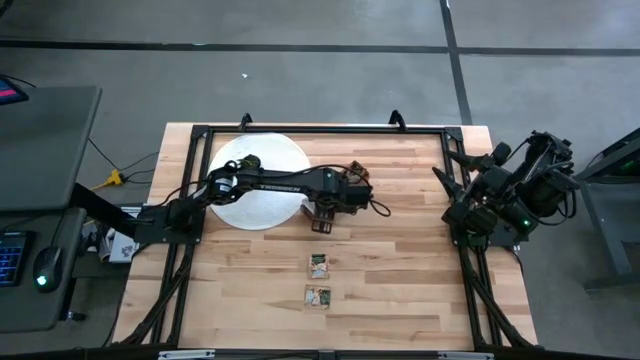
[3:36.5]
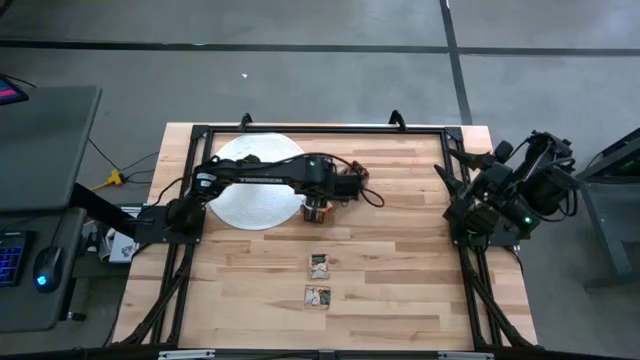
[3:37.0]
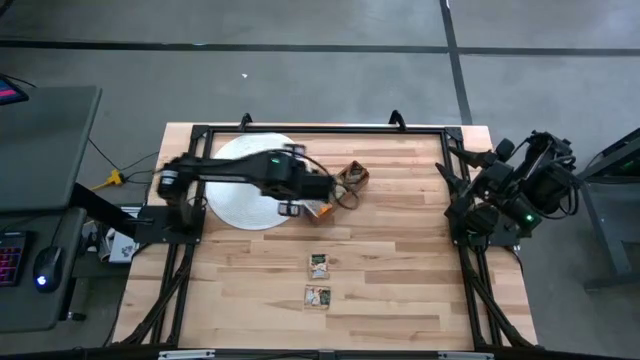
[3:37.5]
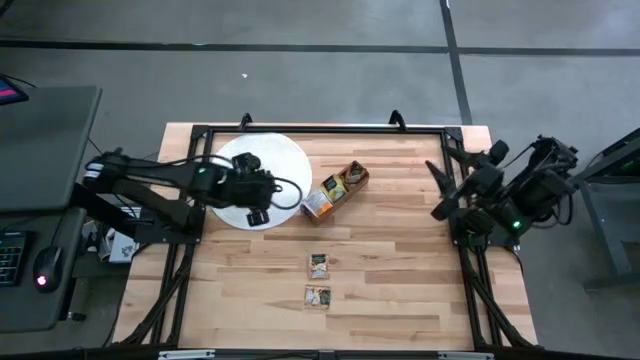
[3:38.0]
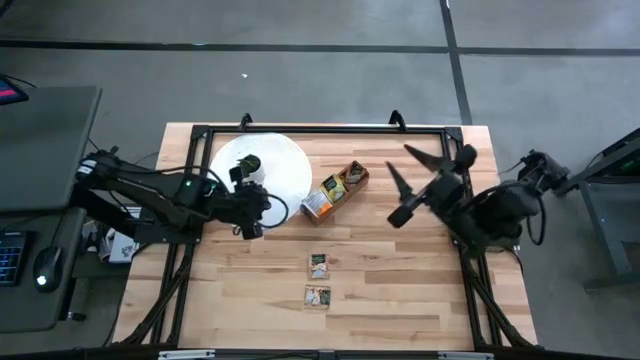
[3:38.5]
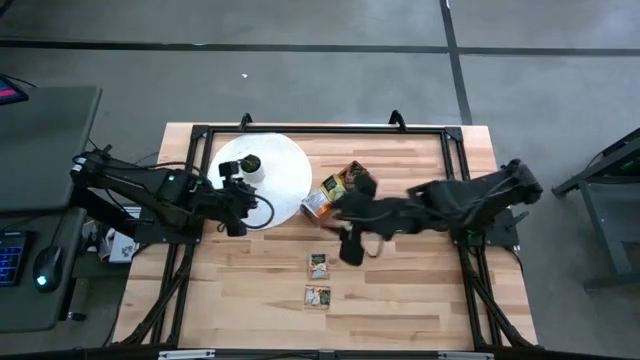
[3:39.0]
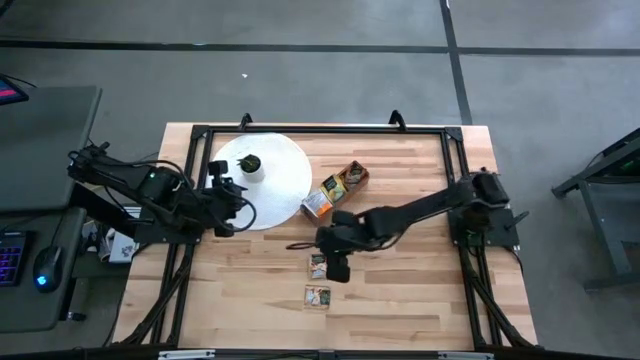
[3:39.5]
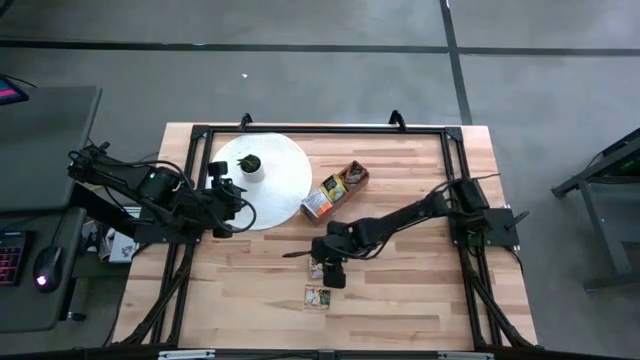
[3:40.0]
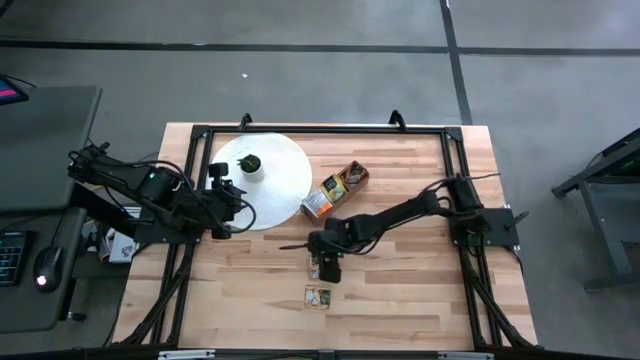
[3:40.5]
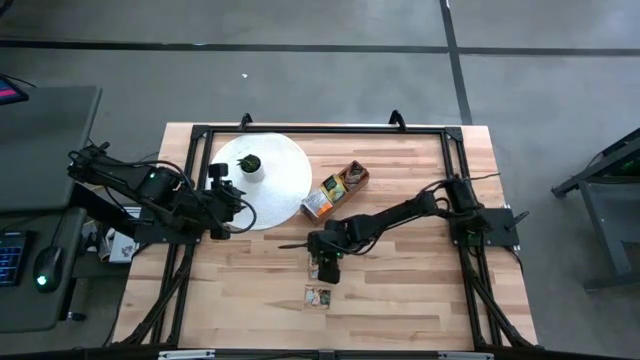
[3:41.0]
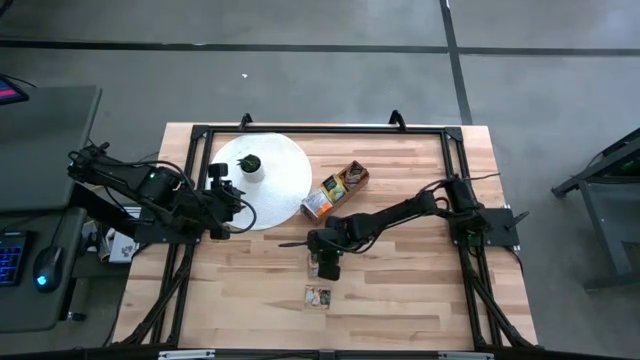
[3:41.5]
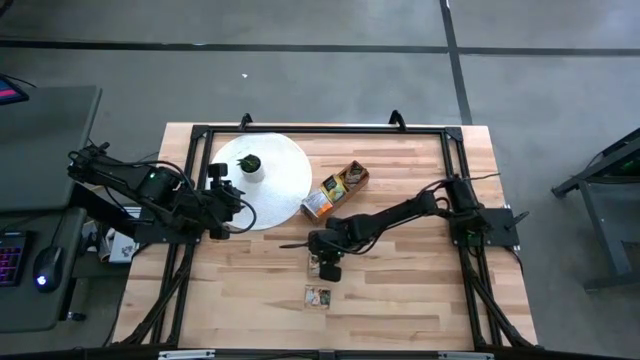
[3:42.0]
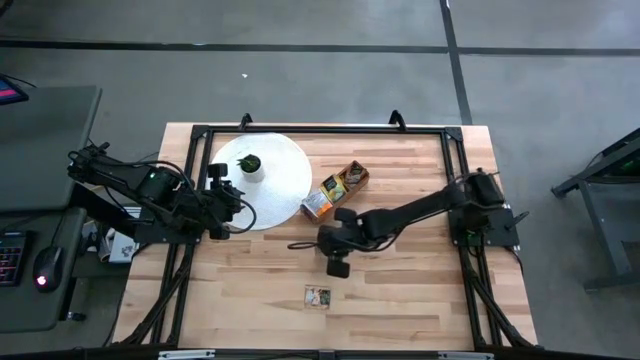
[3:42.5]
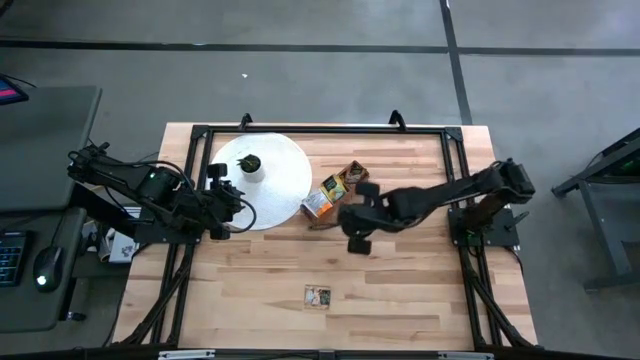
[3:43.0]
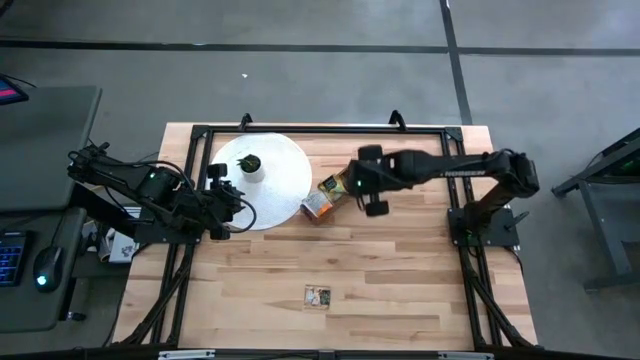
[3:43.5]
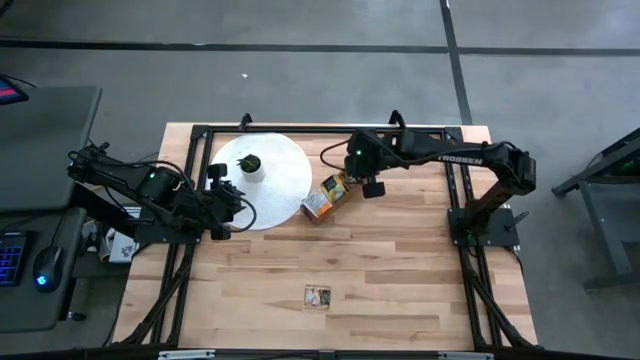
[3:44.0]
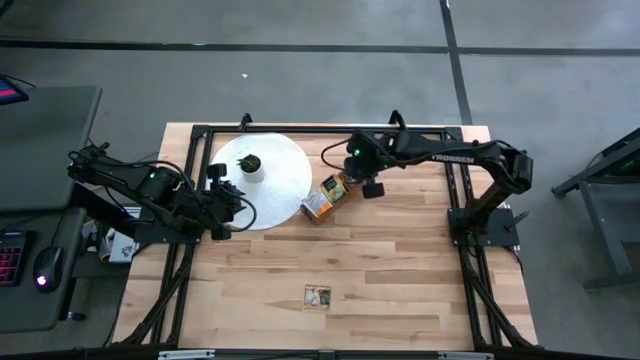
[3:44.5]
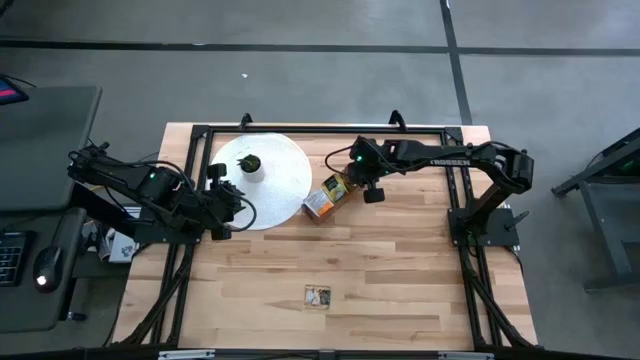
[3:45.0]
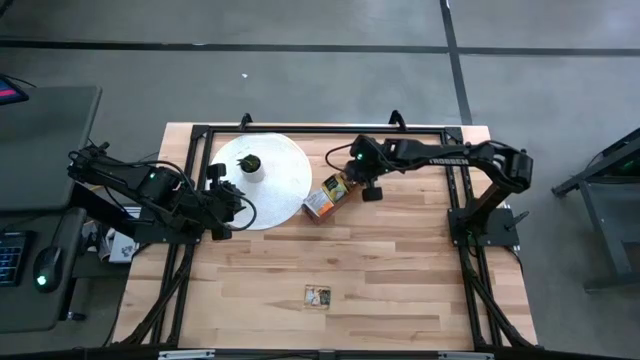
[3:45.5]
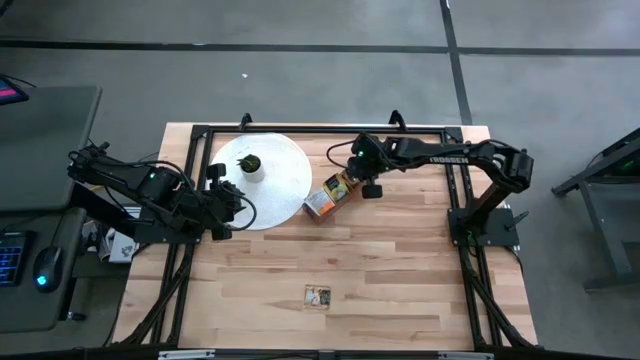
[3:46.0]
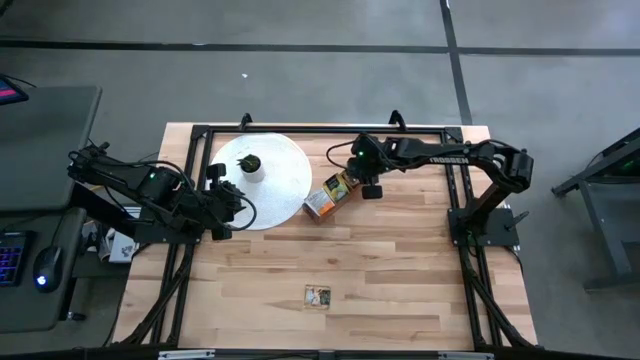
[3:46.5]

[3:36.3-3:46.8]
Task: Pick & Place Tea
Put the brown tea bag into the right section of the wooden organizer

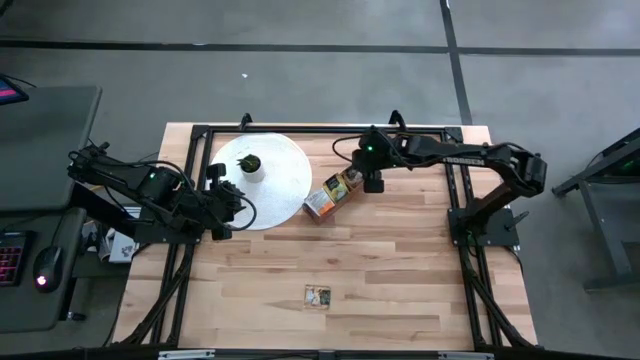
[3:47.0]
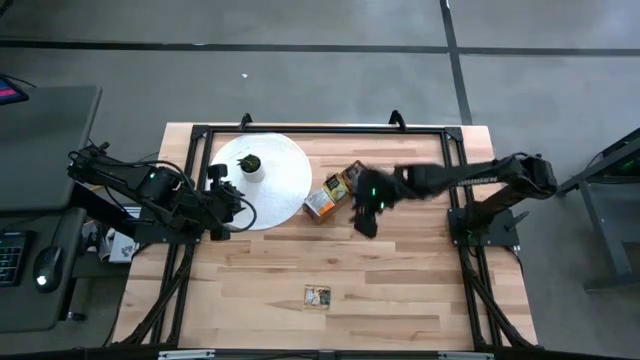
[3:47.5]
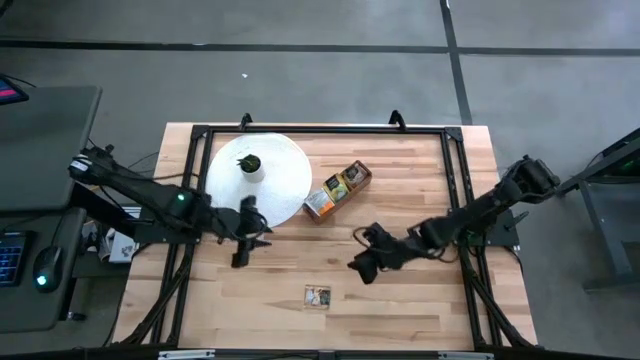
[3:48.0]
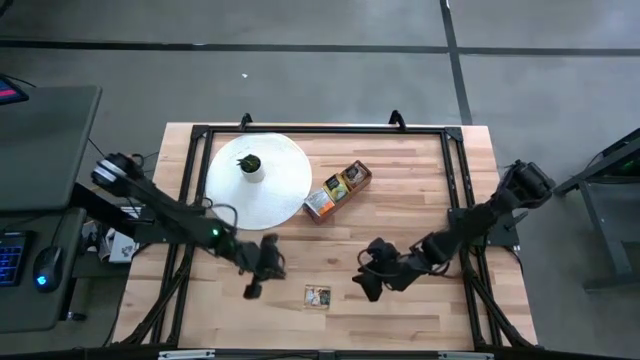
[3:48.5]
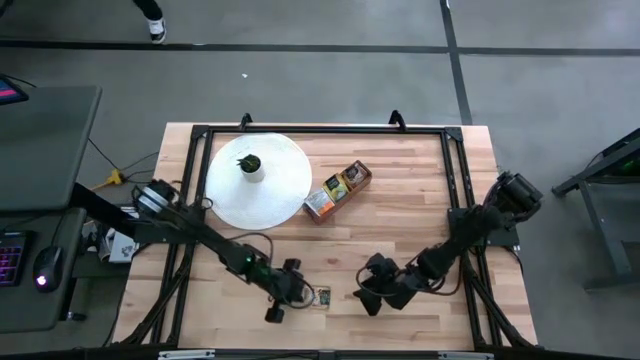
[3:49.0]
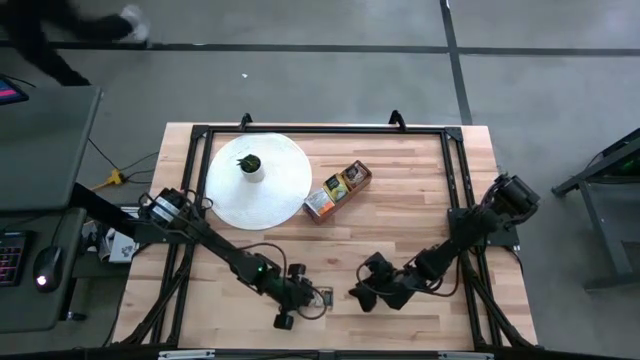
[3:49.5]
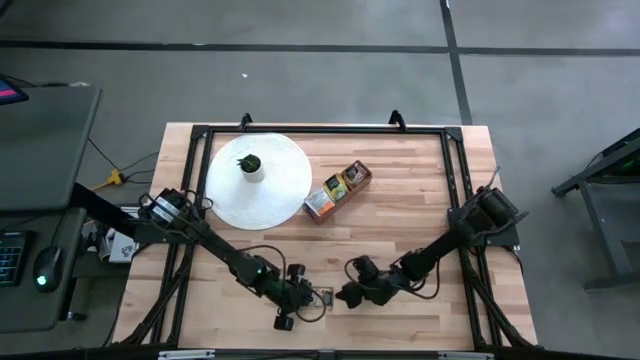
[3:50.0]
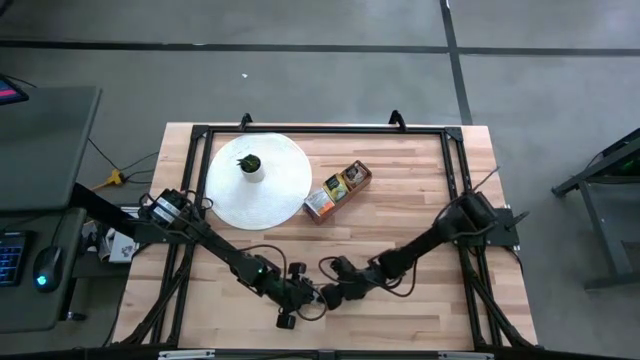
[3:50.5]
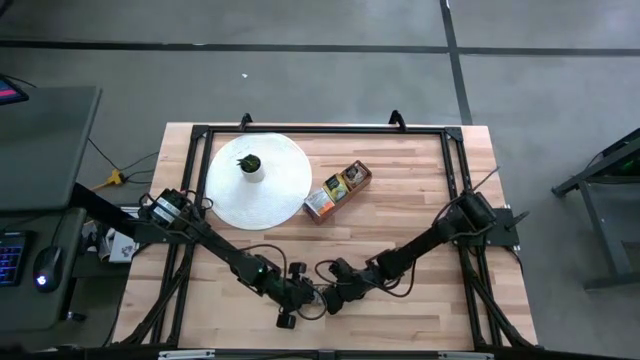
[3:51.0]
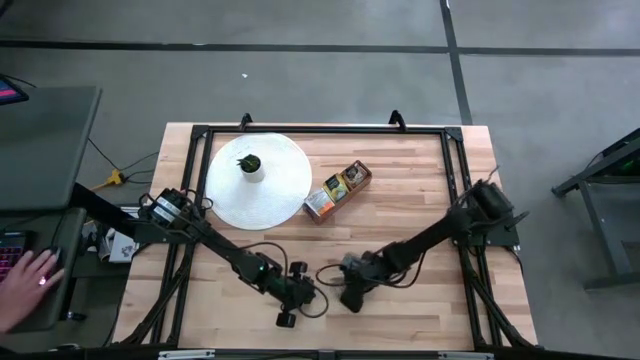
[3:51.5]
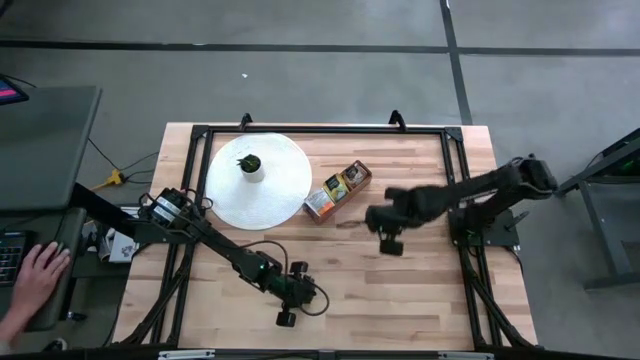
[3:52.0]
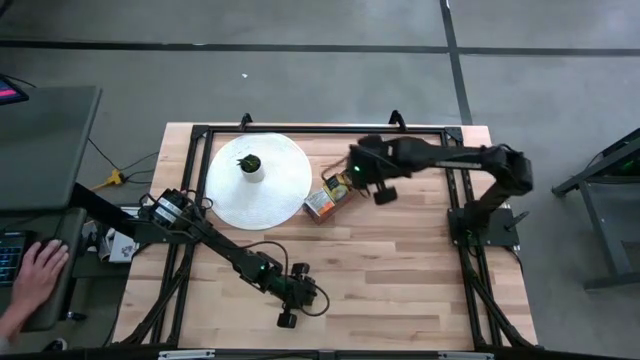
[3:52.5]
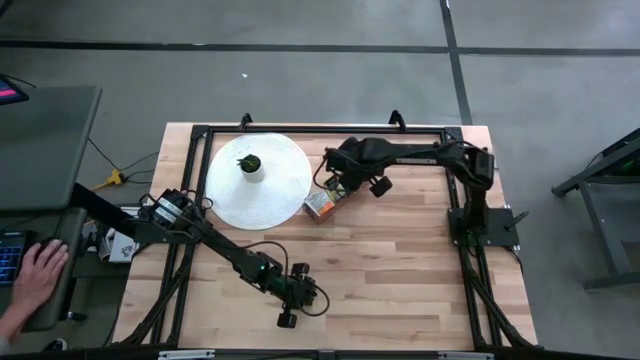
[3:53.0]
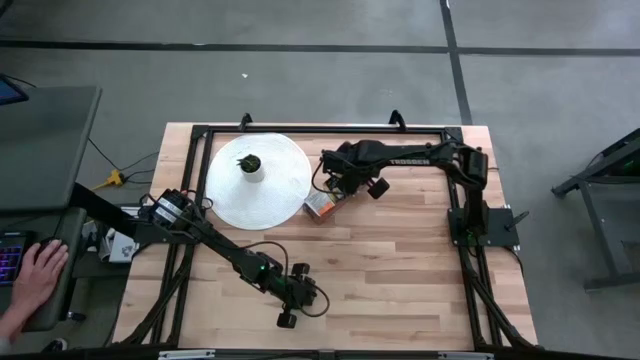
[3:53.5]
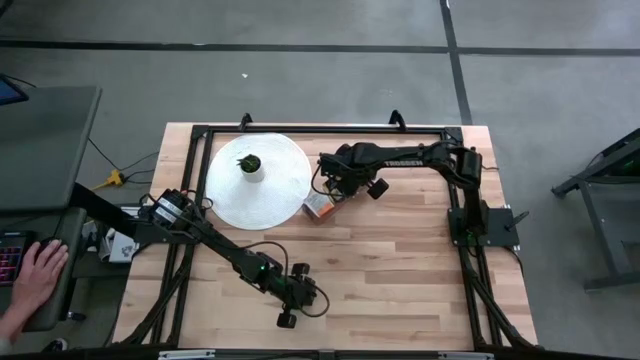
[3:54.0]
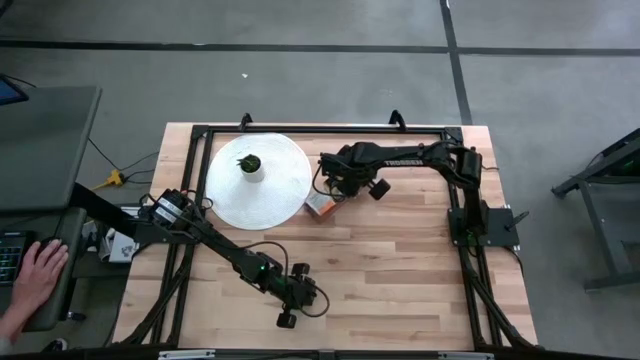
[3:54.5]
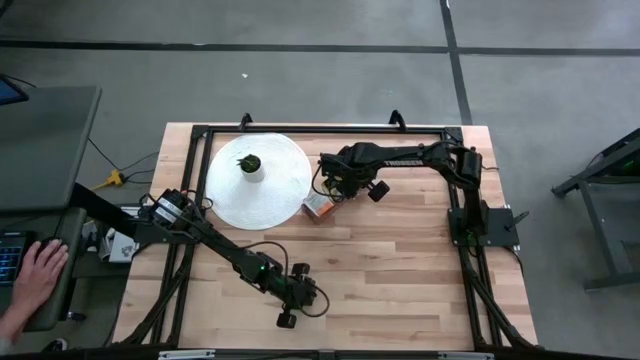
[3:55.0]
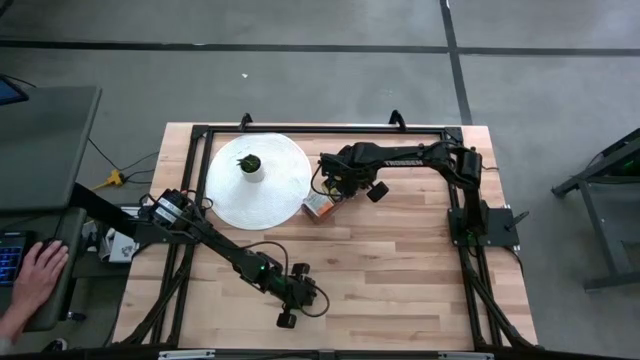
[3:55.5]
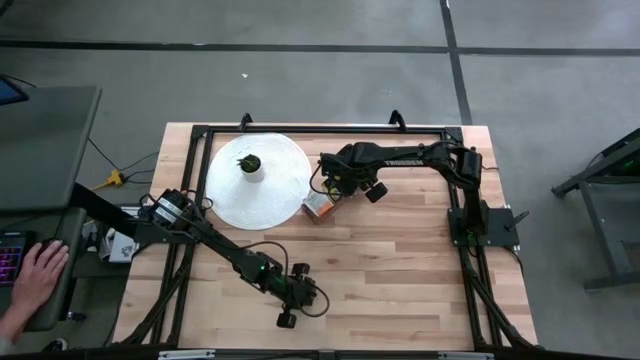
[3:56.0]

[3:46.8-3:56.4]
Put the brown tea bag into the right section of the wooden organizer

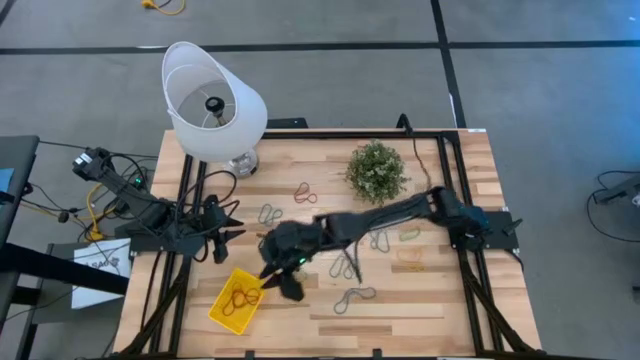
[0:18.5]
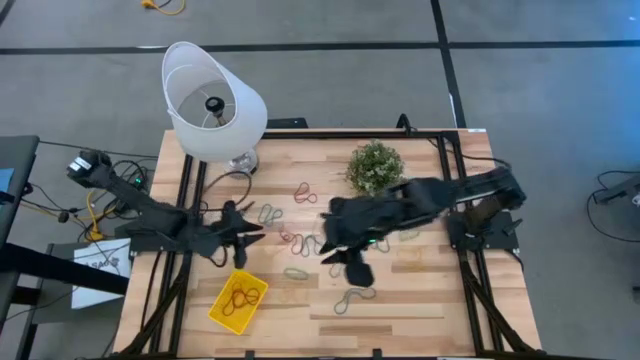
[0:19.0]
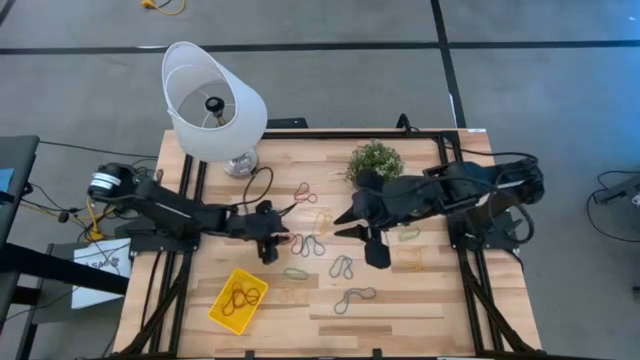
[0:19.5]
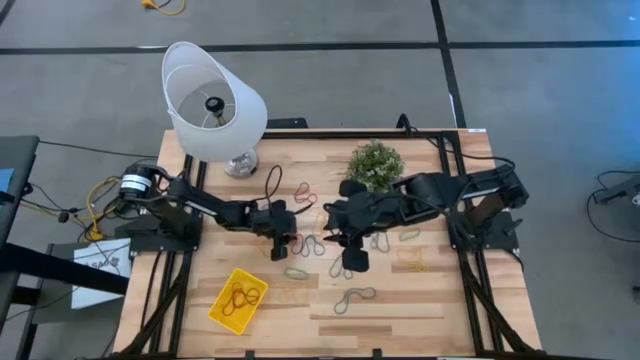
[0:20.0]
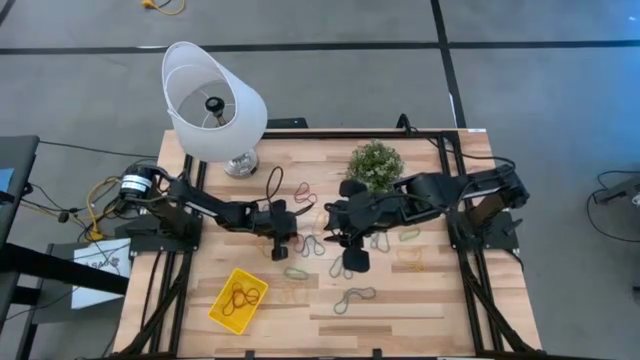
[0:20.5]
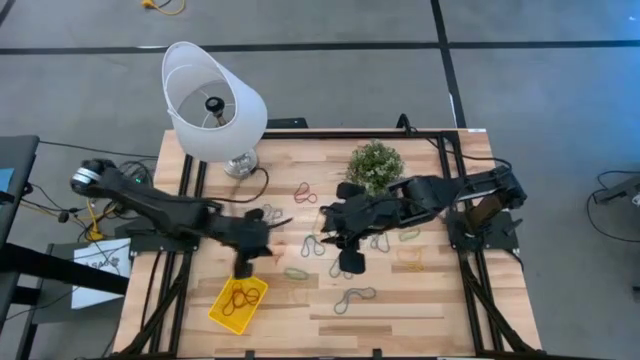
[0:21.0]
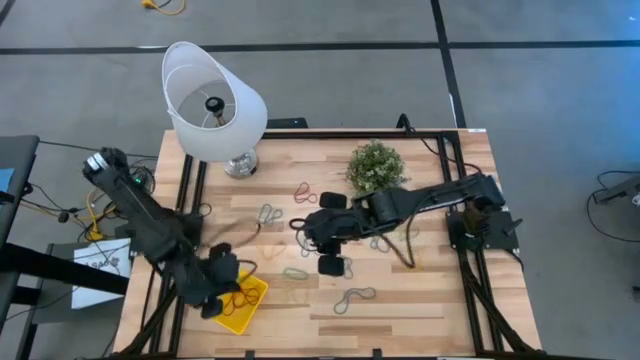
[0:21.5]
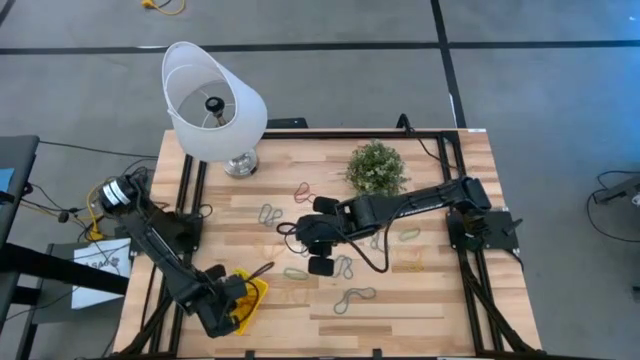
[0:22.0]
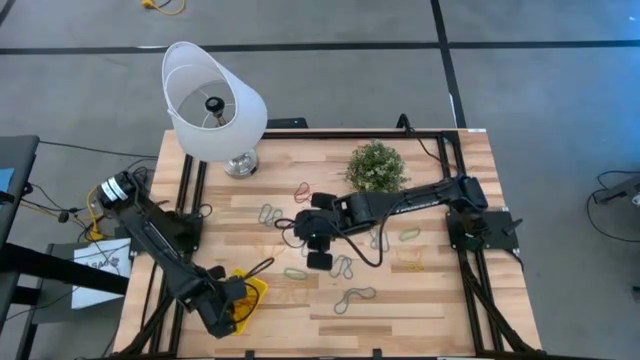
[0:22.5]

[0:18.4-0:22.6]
Task: Pick and place items into bin
Put the bottom red rubberband into the yellow bin
